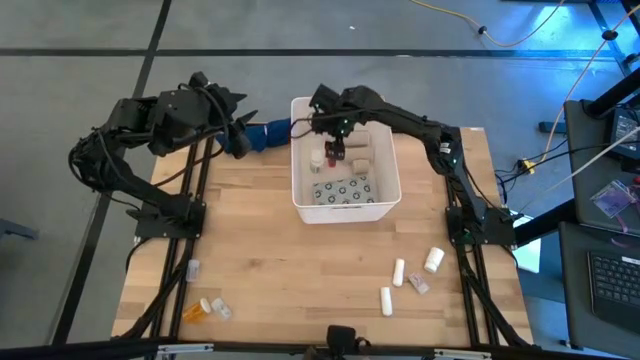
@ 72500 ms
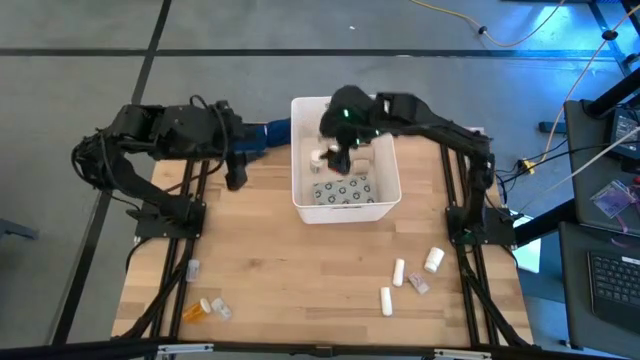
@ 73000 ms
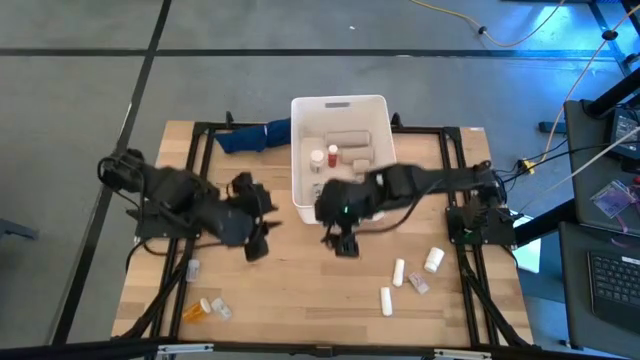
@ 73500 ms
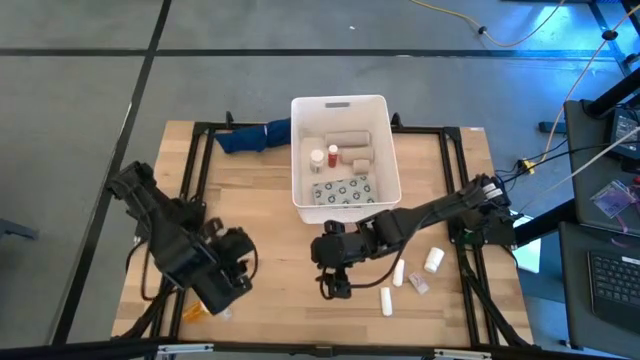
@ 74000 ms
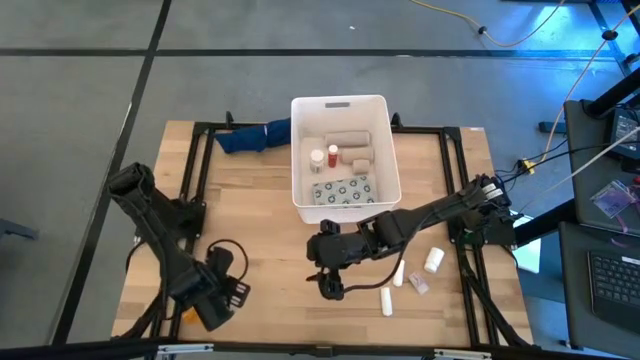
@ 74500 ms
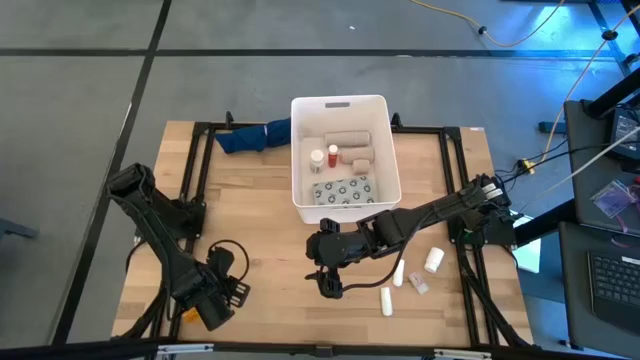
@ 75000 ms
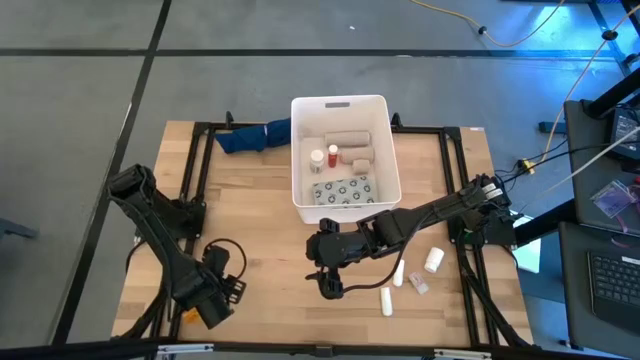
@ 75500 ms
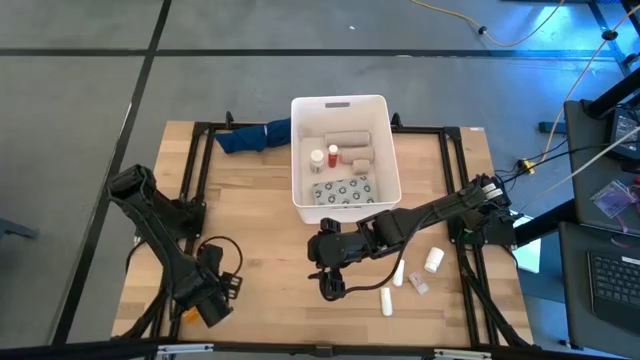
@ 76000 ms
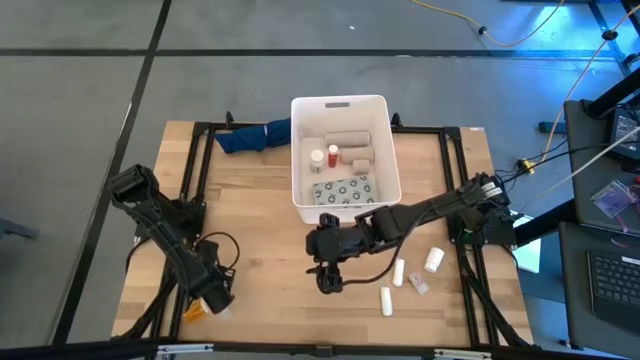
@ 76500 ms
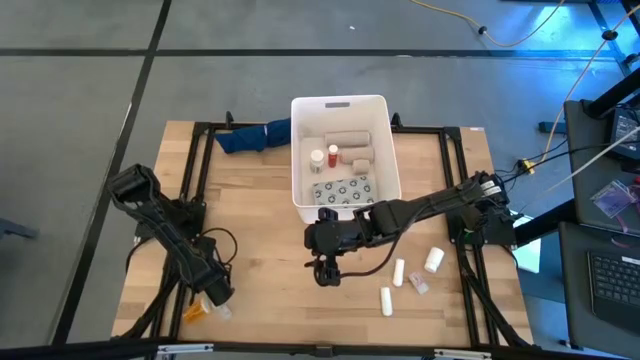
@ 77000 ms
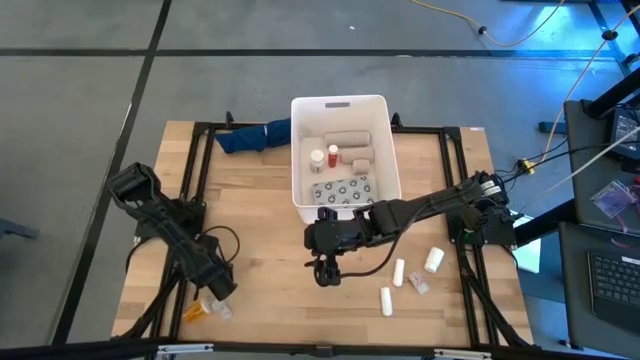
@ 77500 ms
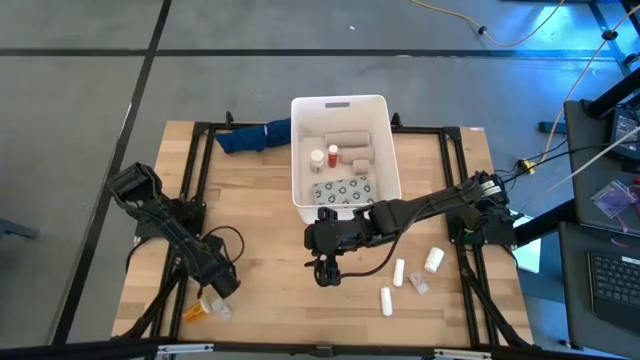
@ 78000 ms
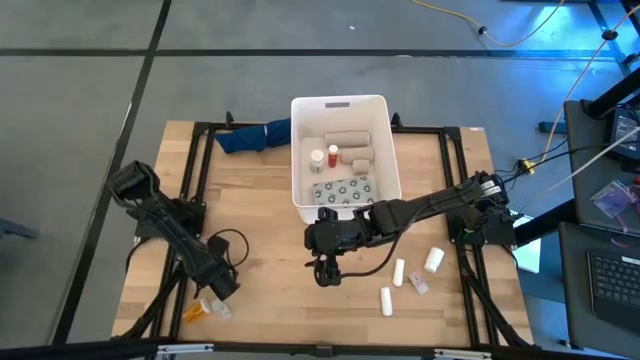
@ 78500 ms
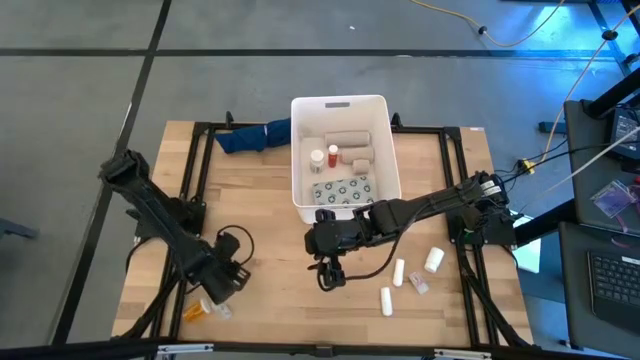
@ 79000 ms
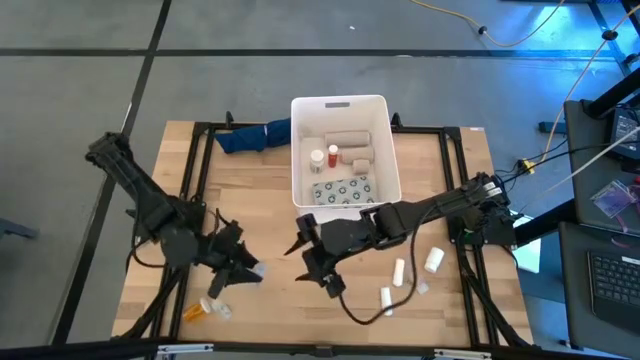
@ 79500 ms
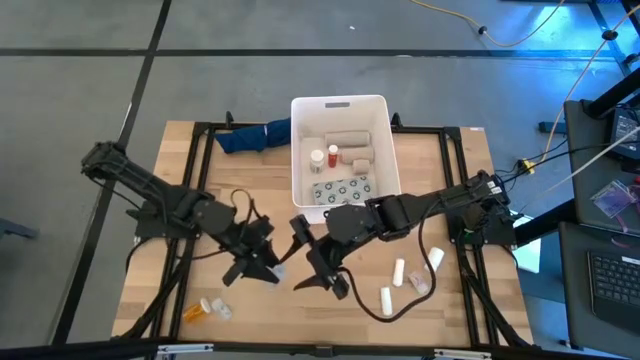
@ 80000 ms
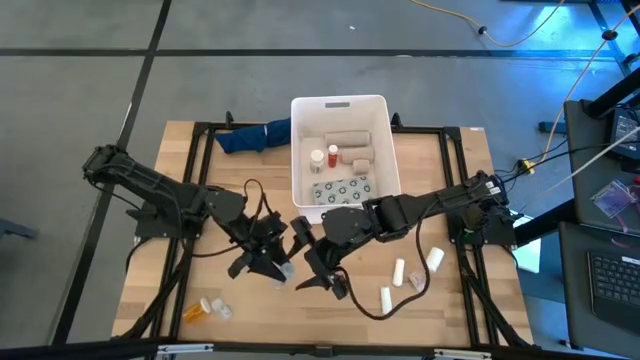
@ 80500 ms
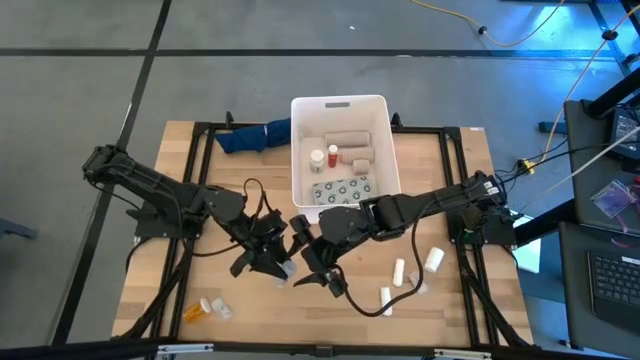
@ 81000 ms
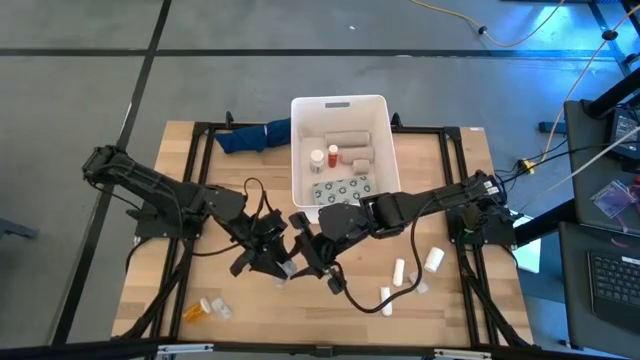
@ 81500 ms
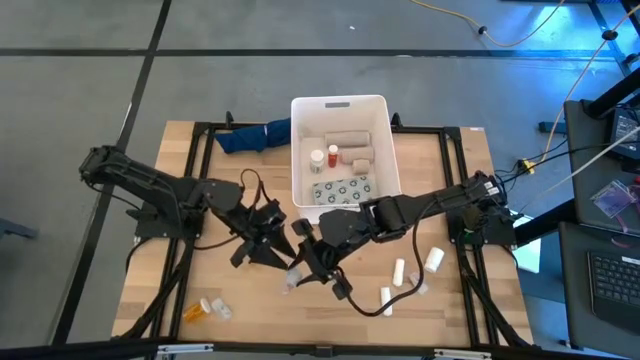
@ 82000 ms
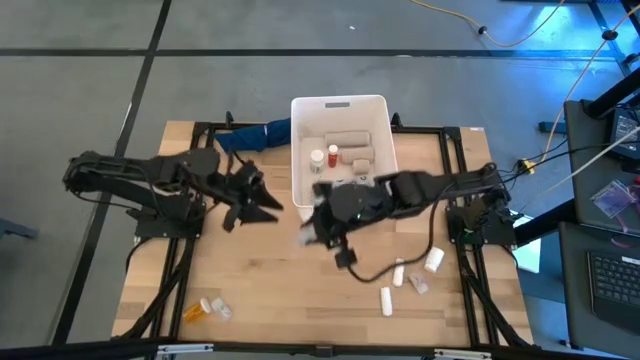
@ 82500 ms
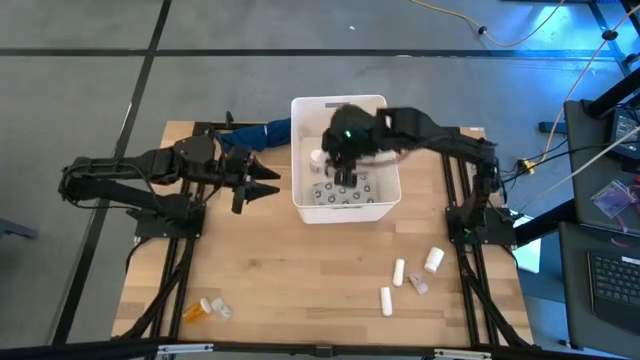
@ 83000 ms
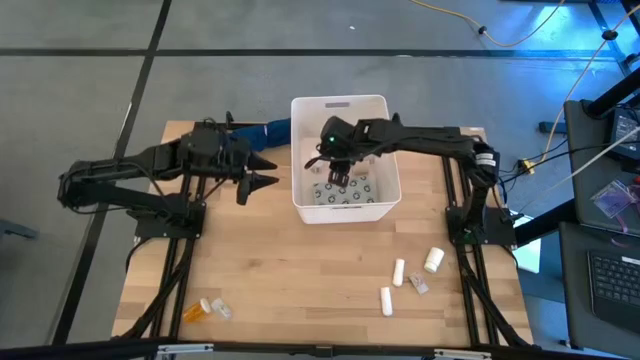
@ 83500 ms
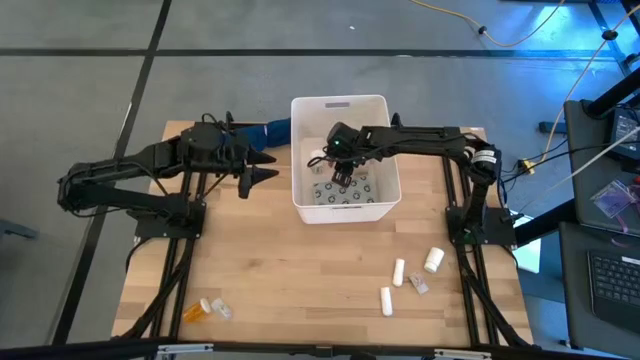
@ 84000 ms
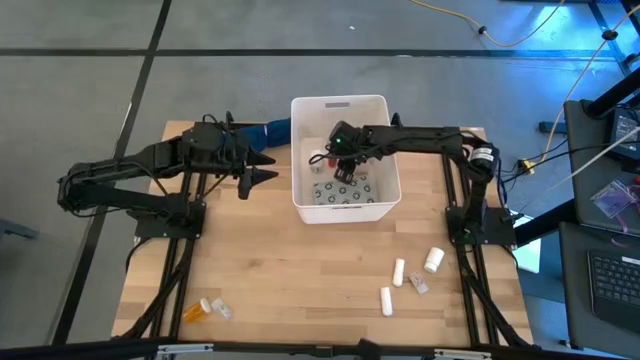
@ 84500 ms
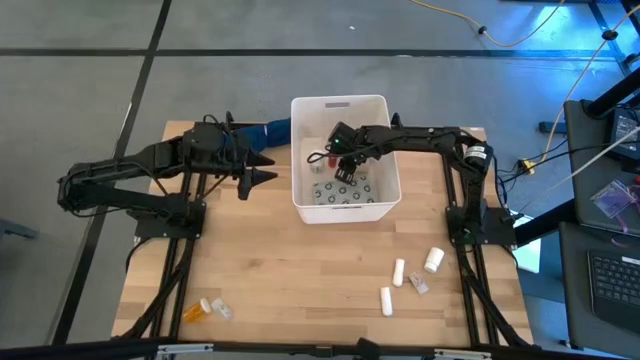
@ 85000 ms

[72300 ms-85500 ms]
Task: Pick & place medical supplies in basket/bin
Put the left transparent medicine bottle into the bin

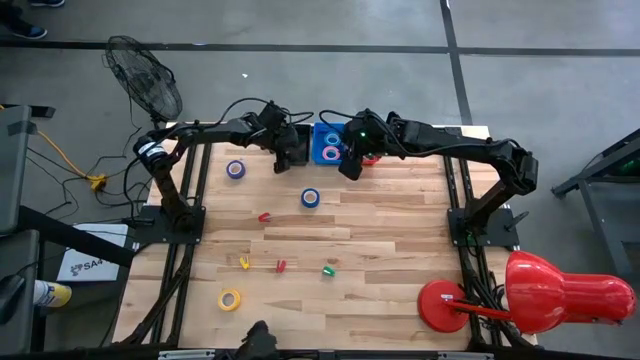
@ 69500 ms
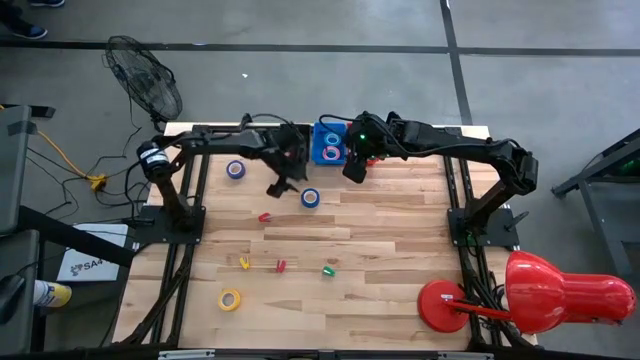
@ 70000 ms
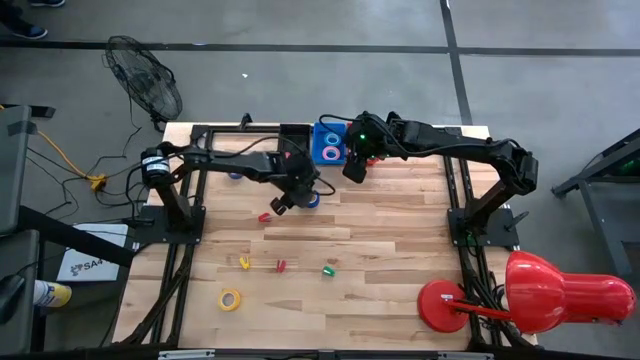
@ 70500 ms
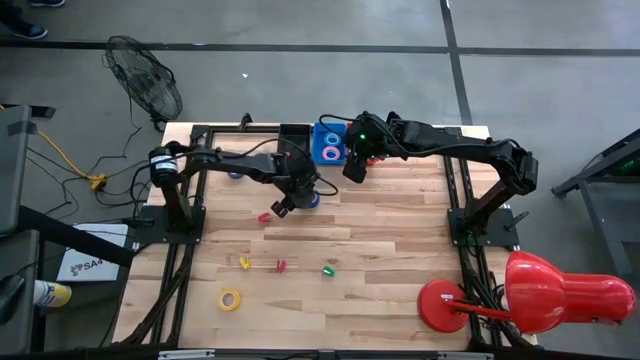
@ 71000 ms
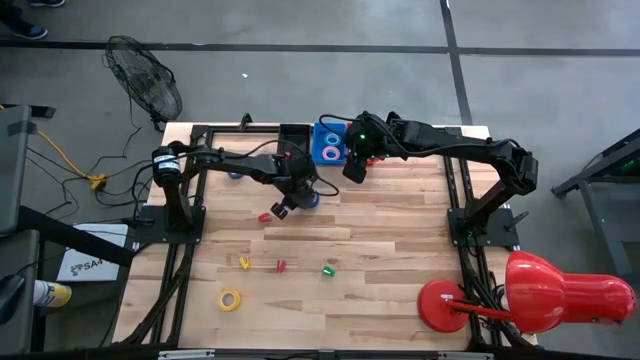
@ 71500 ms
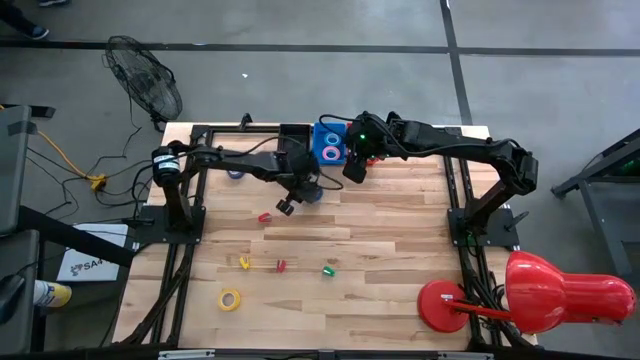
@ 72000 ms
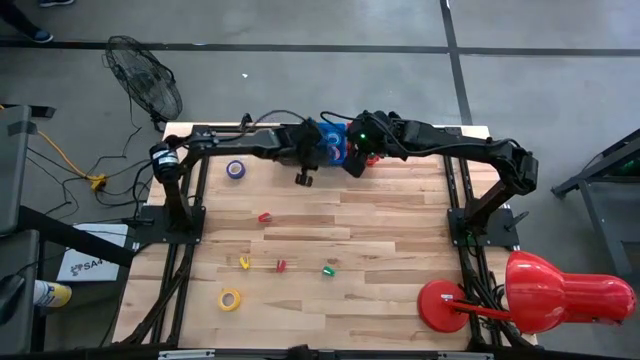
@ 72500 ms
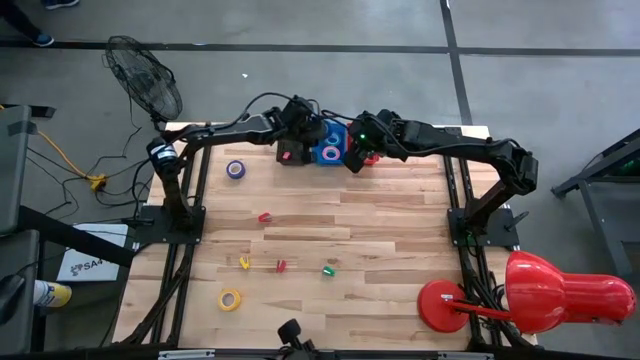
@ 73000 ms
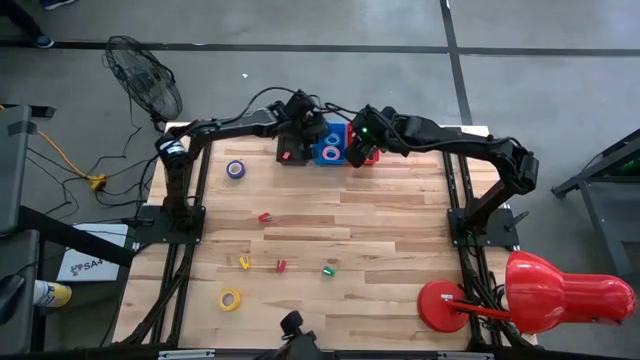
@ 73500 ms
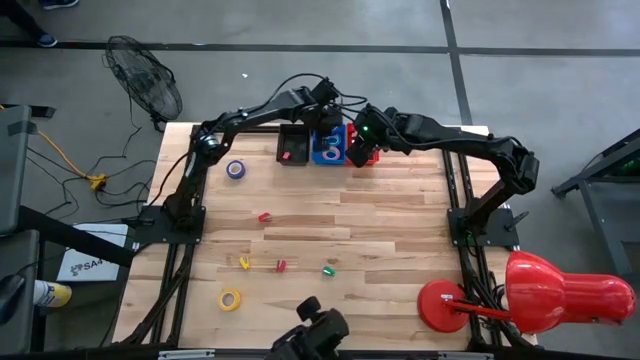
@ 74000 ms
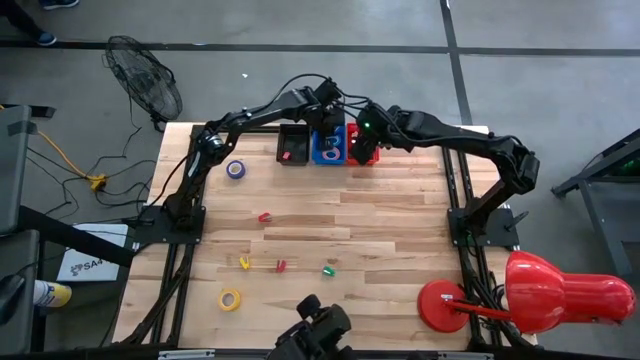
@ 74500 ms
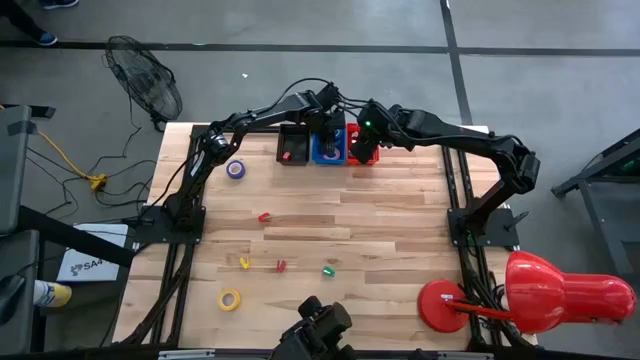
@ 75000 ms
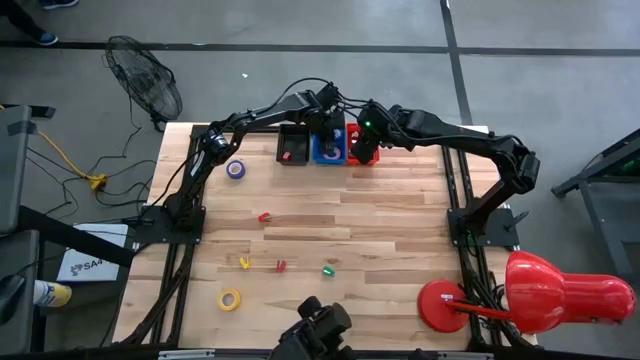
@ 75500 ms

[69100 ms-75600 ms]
Task: Pick and place Stapler, Stapler remover, tape
Put the bottom dark blue tape into the blue bin
